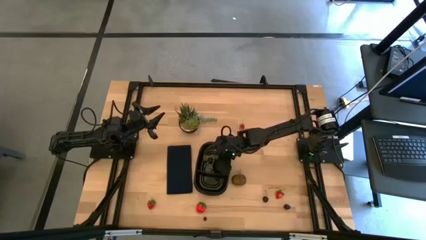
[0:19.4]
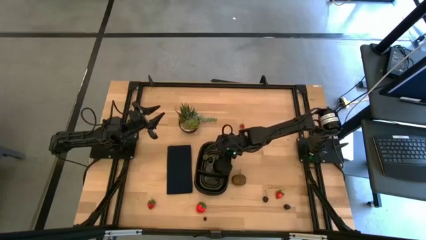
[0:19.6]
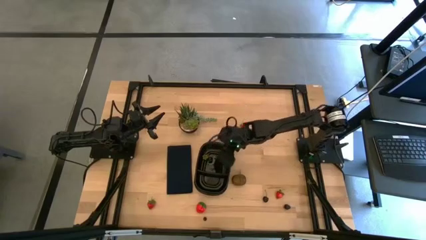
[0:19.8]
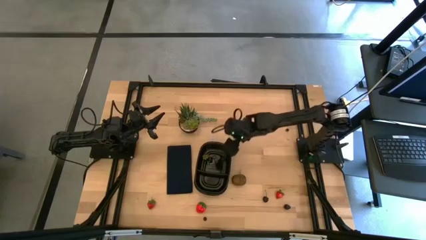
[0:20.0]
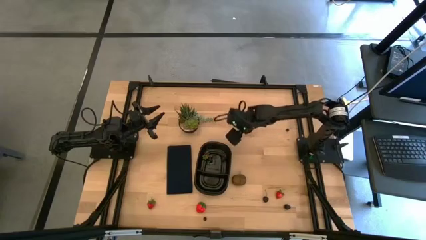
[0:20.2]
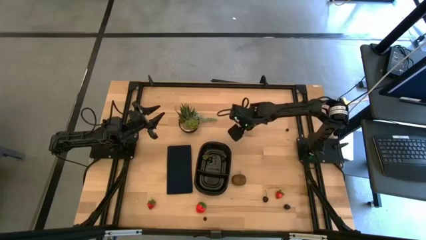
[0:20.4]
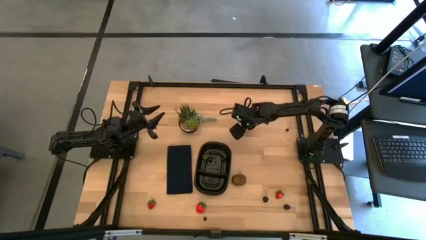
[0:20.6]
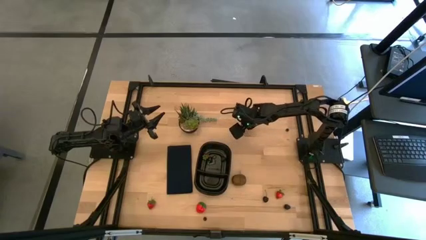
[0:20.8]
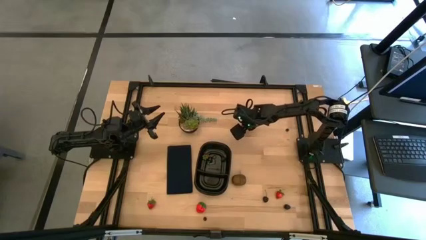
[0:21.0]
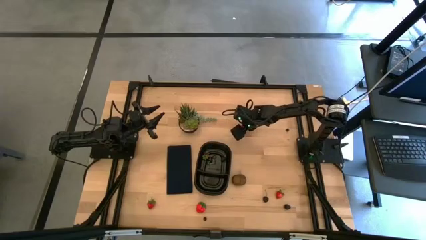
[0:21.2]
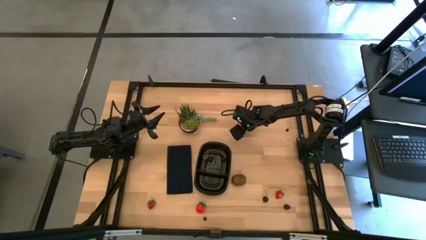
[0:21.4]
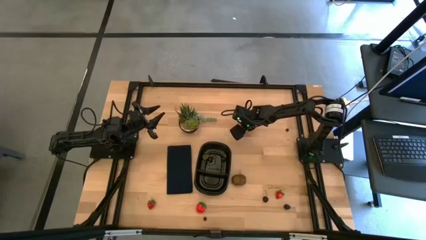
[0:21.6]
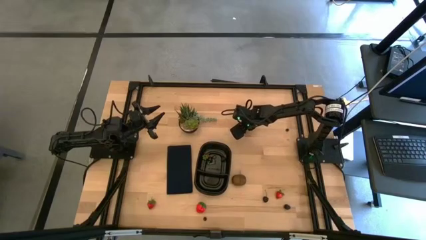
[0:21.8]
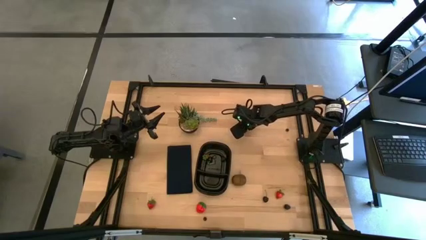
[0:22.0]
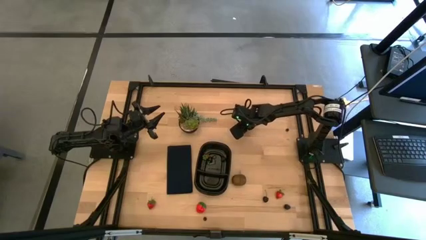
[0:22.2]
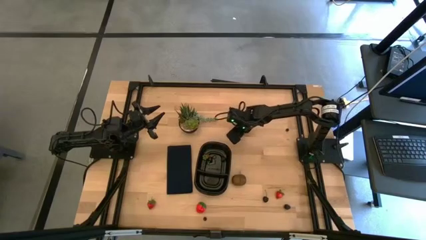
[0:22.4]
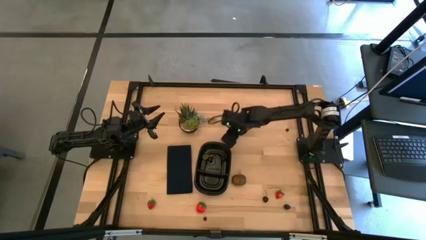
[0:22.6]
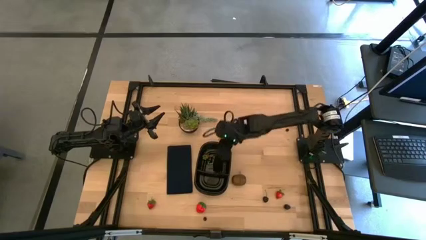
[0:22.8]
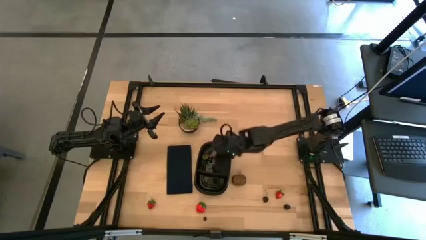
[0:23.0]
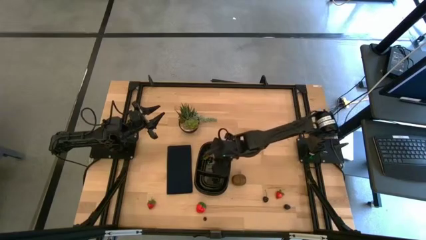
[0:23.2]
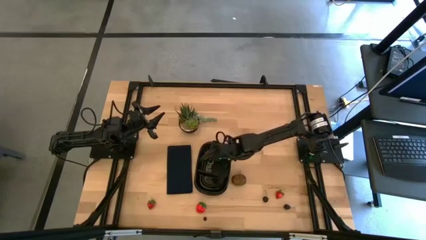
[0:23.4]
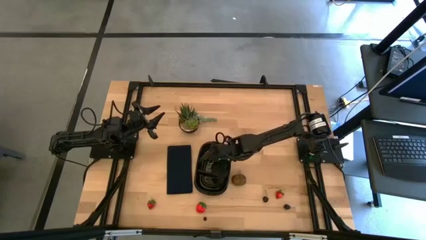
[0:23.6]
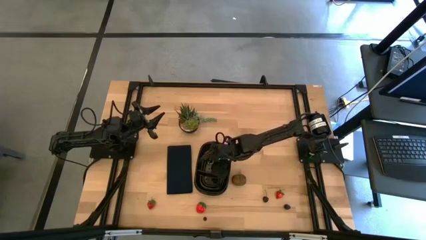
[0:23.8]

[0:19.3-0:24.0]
Task: Pick and placing Produce into tupperware
Put the red strawberry into the black bin

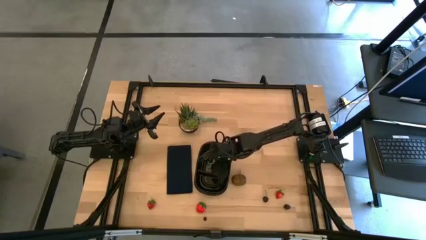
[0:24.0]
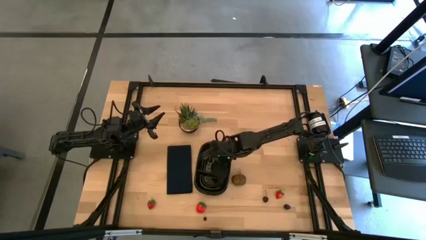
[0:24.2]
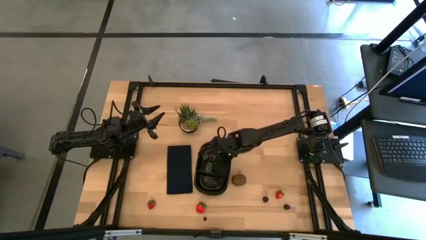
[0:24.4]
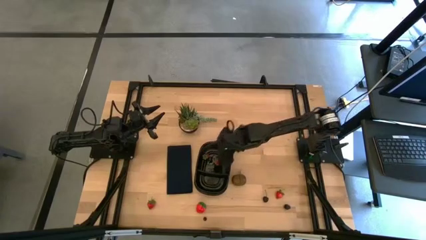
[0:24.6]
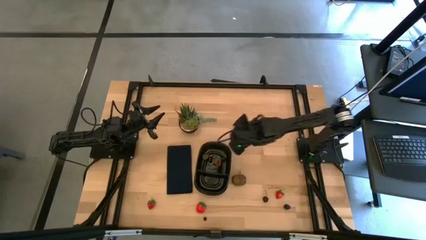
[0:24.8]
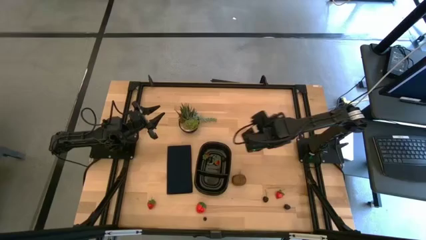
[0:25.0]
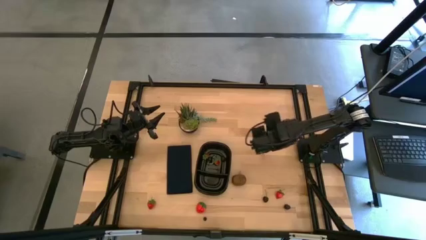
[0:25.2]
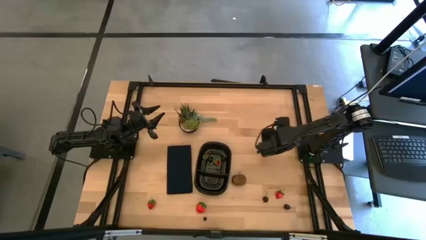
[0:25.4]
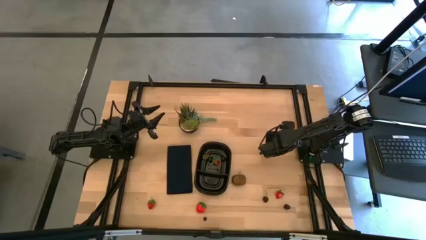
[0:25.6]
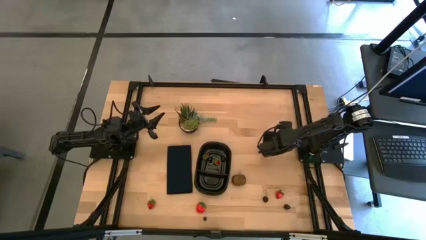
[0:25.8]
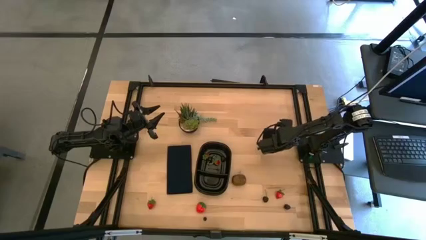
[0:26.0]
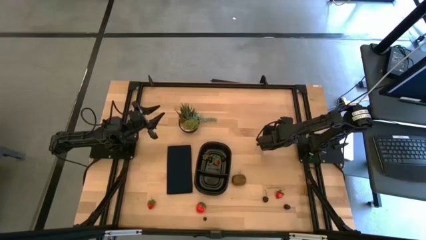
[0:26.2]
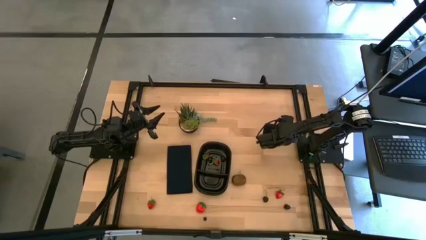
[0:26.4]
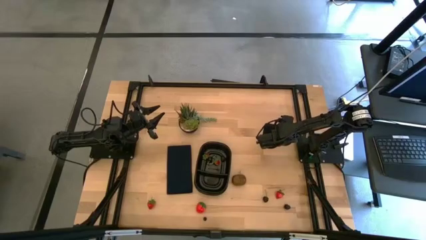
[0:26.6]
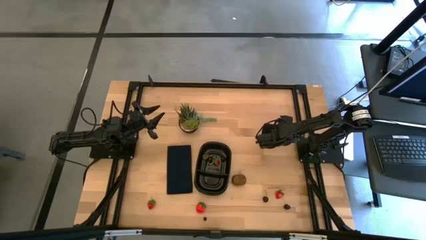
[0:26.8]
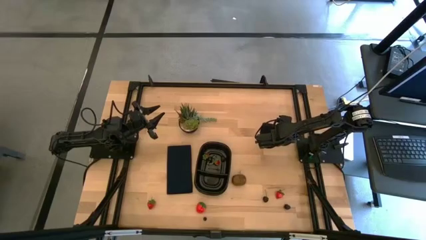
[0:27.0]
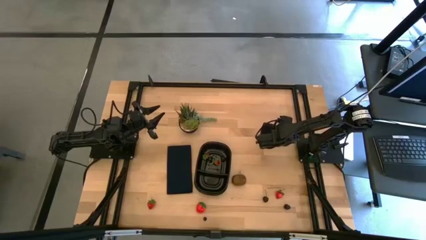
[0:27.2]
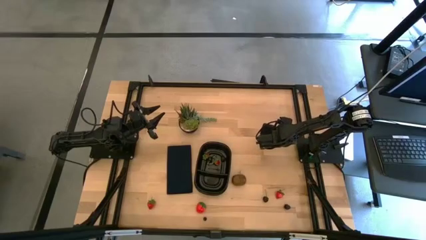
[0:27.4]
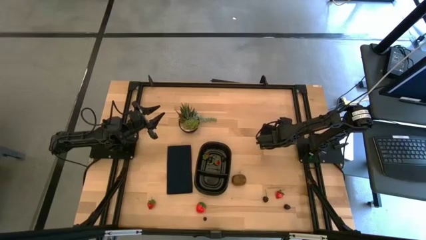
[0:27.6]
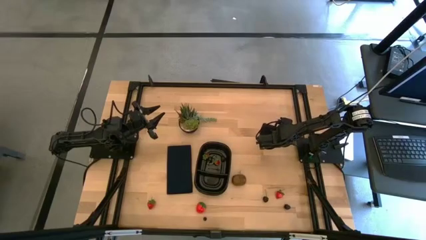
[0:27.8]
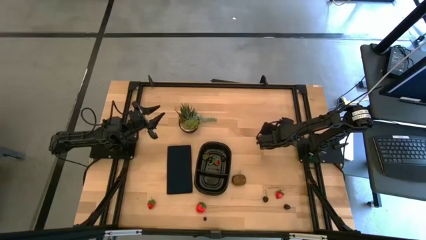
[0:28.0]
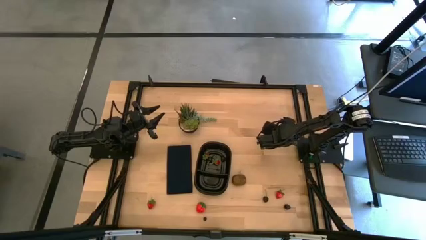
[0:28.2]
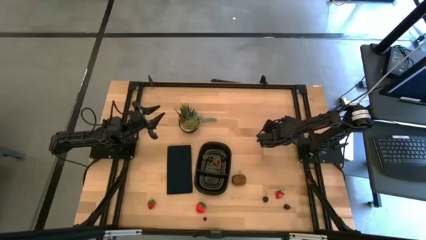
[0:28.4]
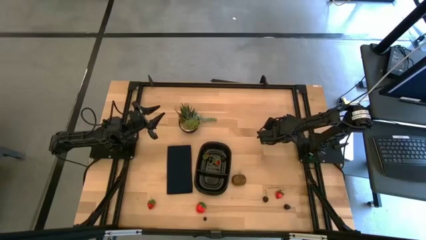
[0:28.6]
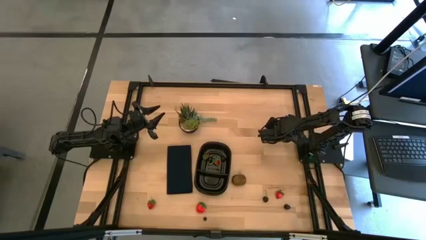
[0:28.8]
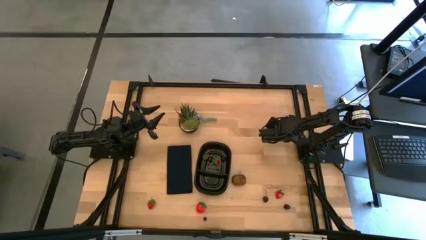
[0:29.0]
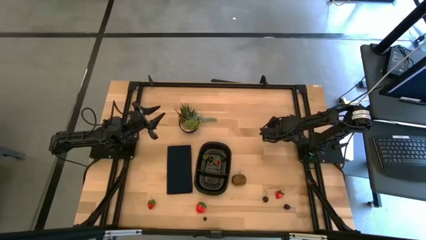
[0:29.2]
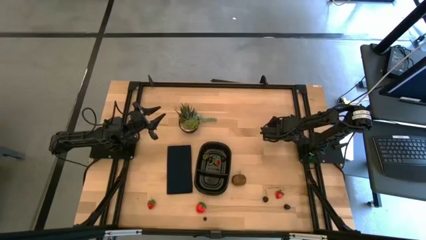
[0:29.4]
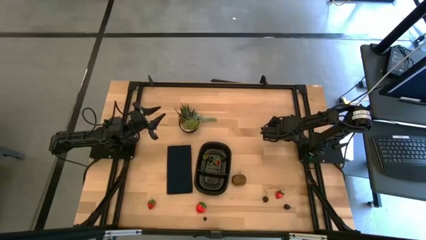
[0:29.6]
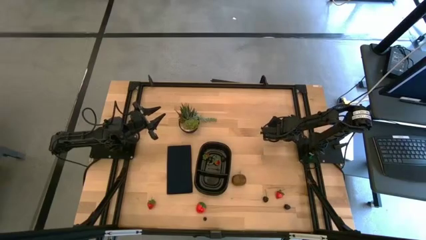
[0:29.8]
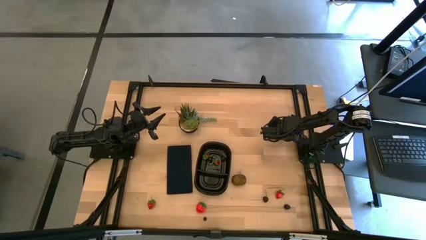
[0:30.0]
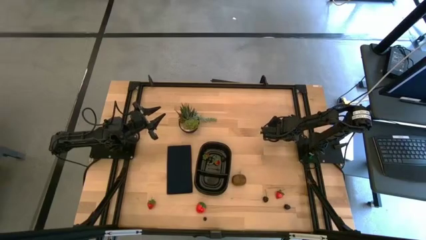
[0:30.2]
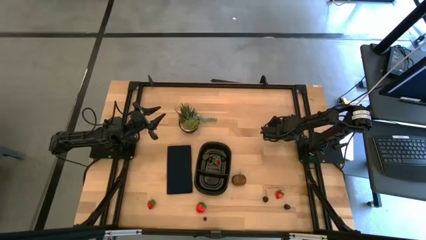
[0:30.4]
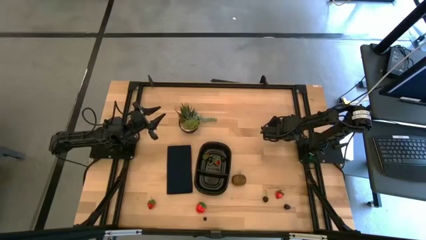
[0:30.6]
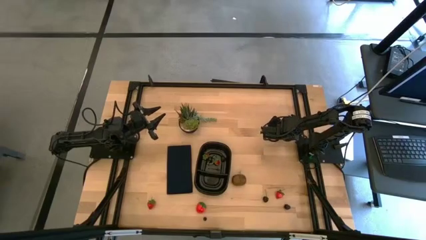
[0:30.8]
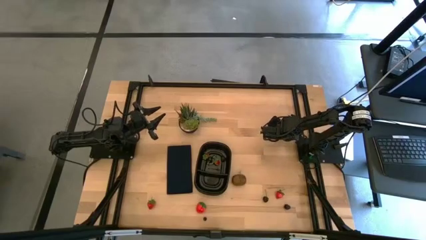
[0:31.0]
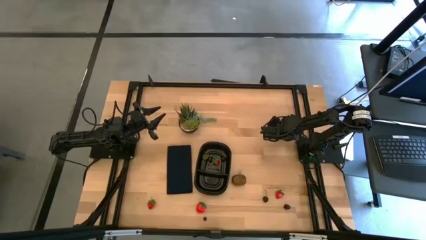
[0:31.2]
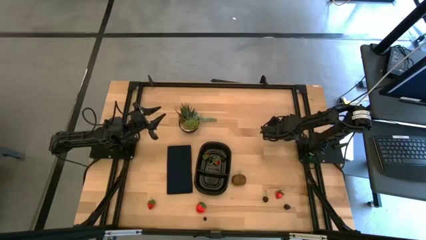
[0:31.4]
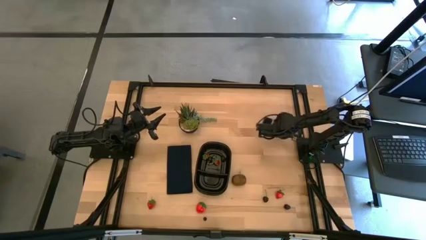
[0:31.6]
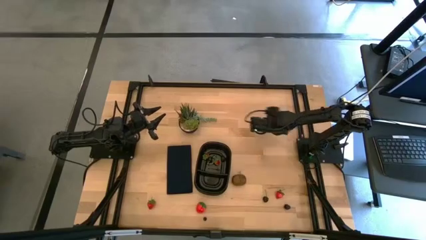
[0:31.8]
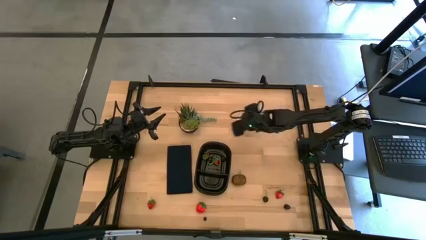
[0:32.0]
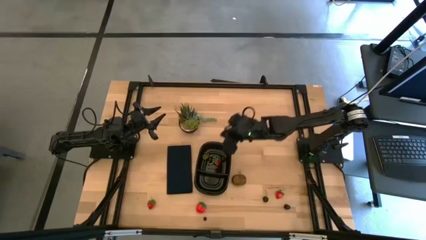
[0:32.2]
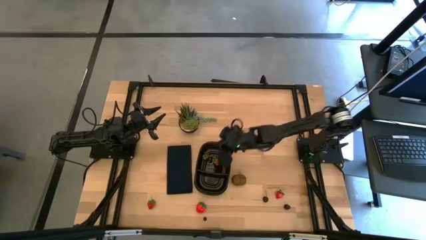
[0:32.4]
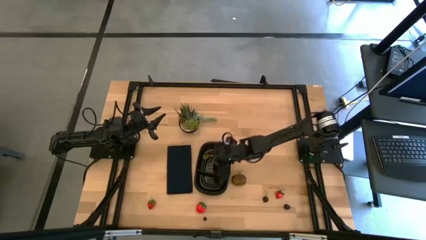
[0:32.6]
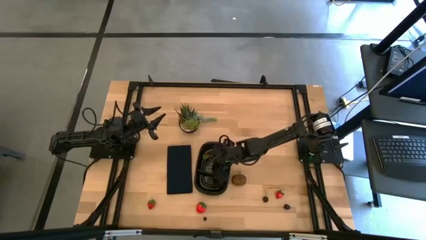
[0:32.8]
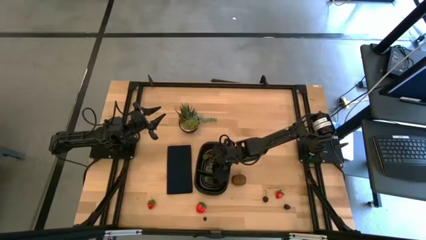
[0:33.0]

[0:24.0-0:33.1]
Put the blueberry into the black bin

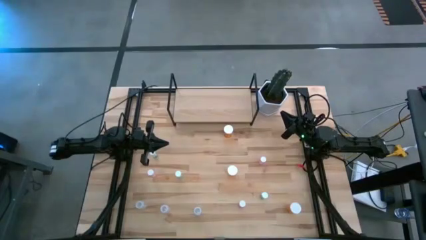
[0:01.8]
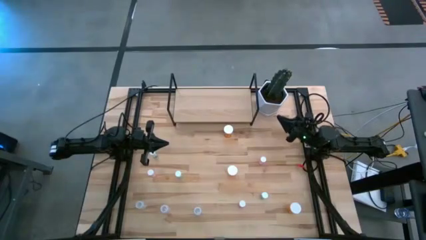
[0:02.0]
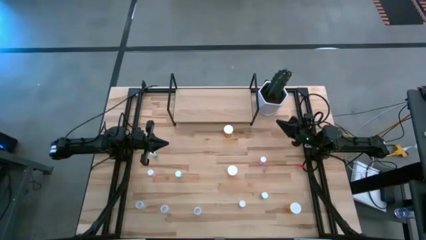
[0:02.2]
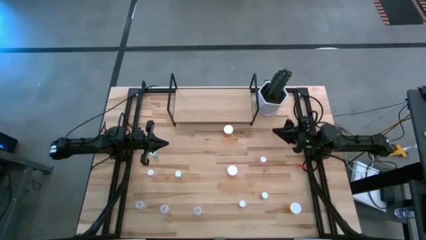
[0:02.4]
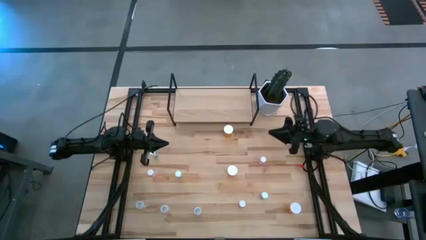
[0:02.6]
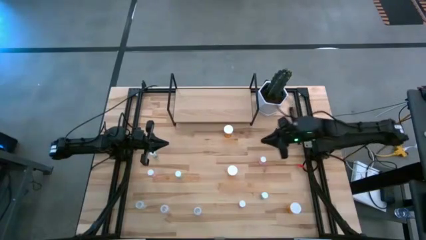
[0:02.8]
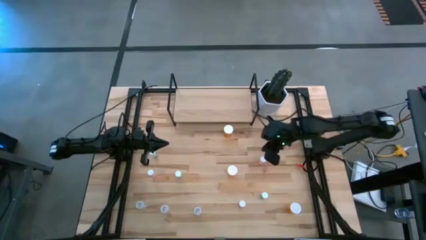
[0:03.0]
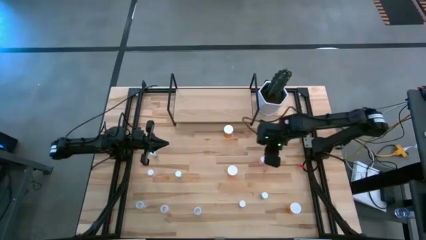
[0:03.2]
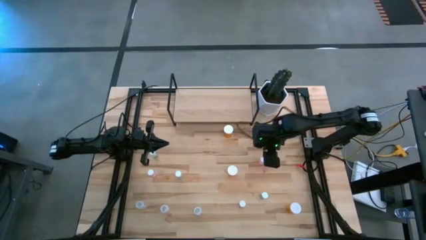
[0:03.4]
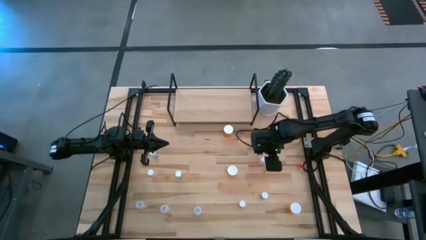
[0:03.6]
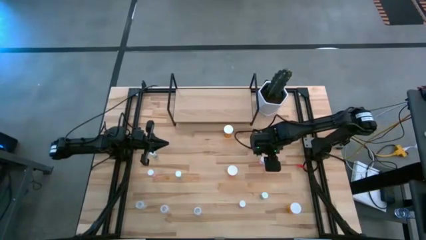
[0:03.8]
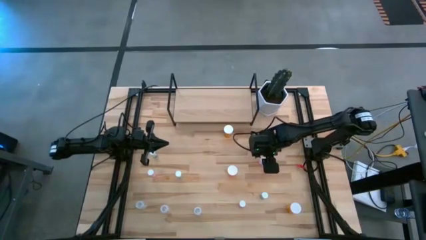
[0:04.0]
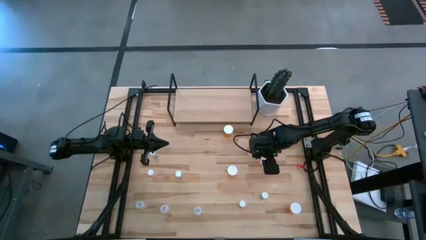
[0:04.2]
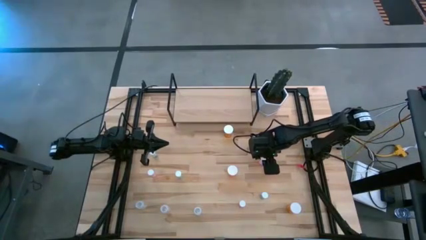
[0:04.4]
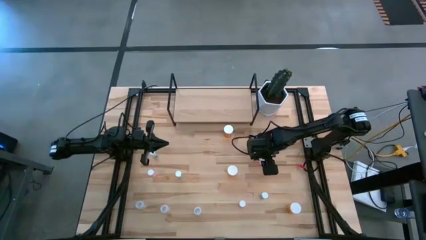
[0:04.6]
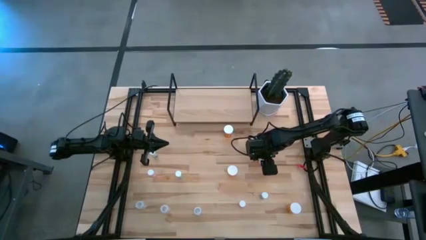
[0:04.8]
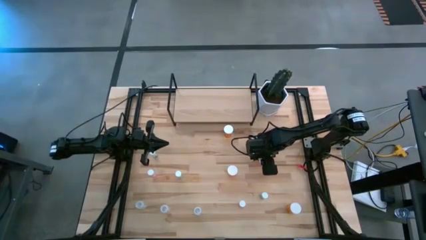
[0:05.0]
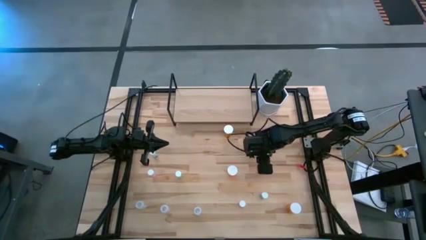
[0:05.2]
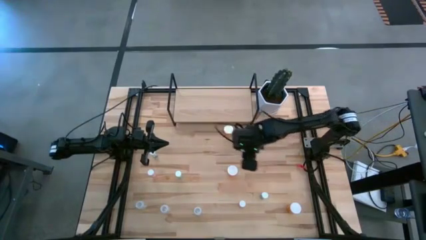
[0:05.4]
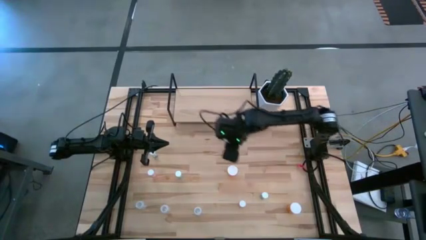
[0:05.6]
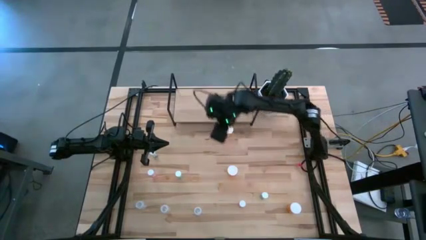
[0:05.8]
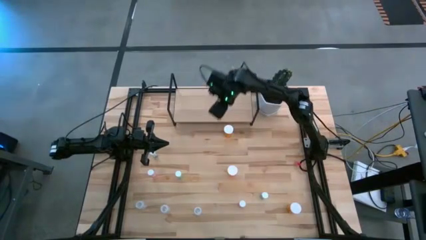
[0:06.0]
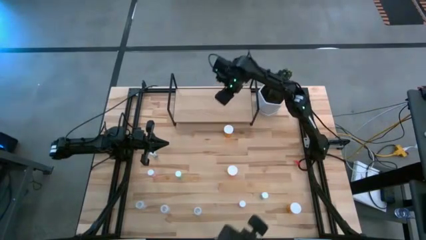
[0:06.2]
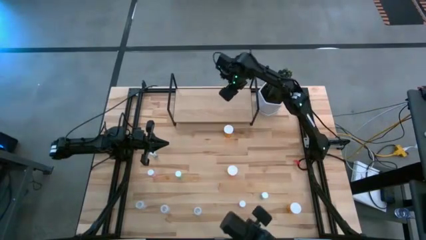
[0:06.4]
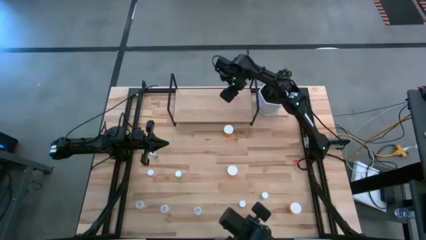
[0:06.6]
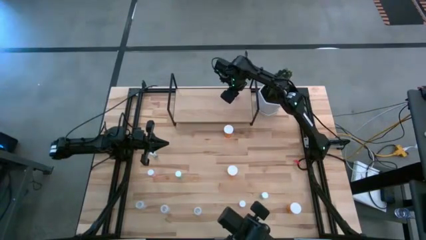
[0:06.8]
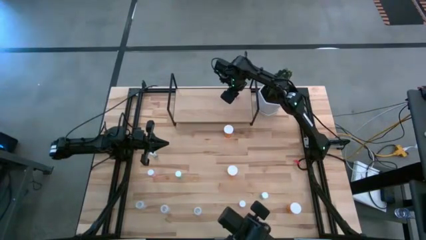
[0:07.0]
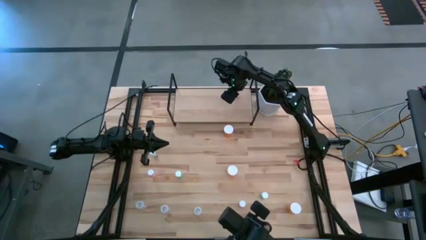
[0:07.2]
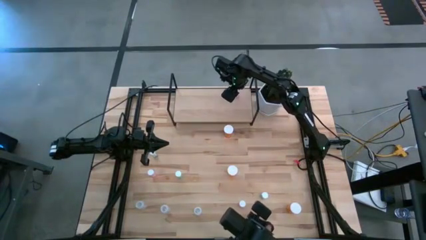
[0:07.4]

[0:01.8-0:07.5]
Task: Pick and place medicine bottles onto shelf by color
Put the top right pink pill bottle on the shelf
